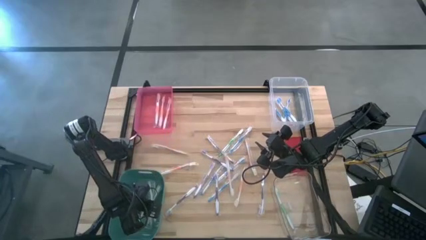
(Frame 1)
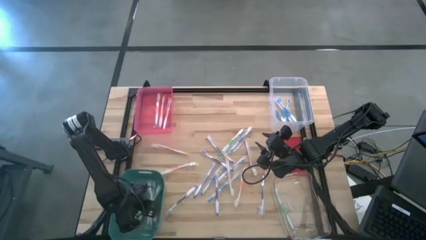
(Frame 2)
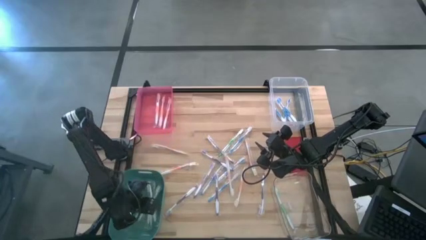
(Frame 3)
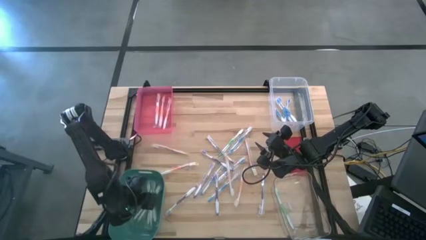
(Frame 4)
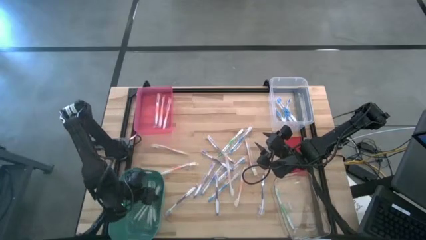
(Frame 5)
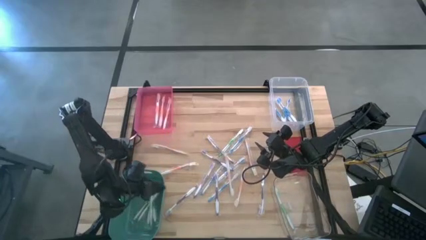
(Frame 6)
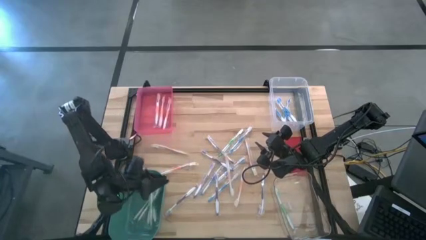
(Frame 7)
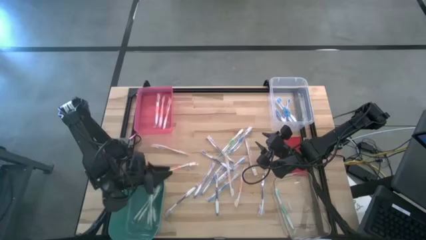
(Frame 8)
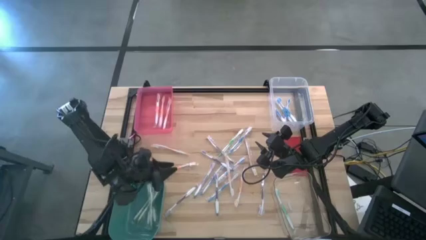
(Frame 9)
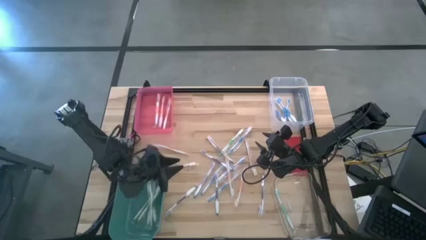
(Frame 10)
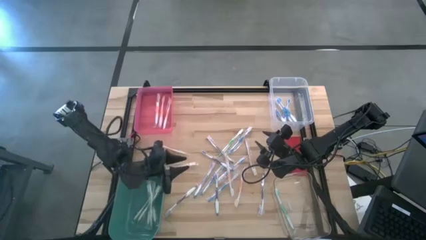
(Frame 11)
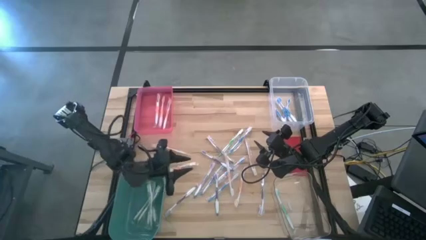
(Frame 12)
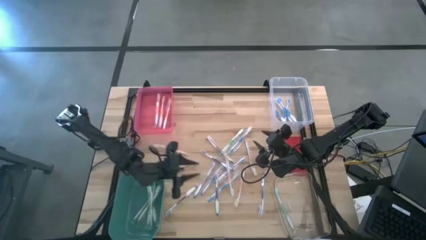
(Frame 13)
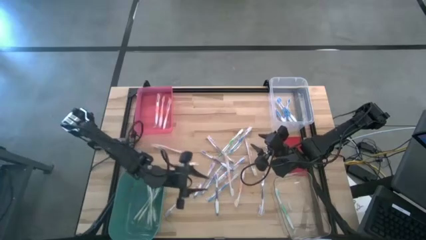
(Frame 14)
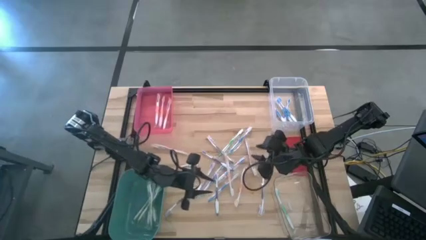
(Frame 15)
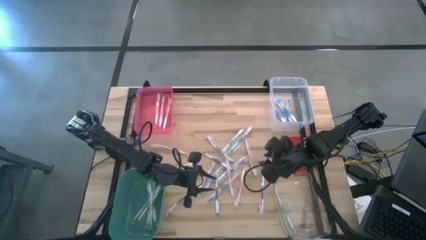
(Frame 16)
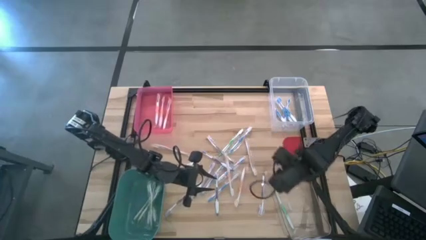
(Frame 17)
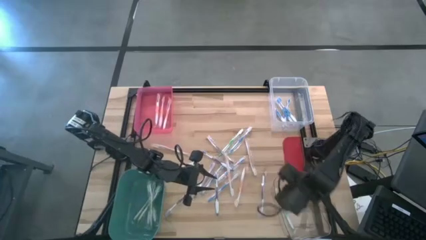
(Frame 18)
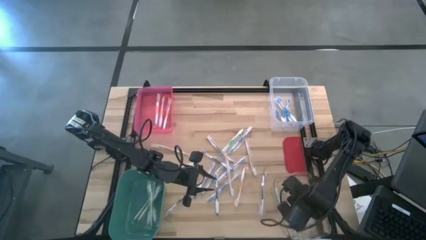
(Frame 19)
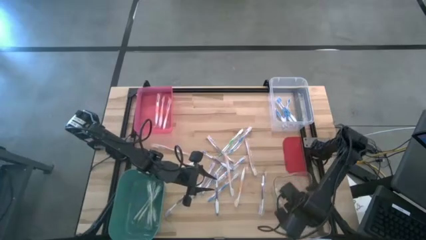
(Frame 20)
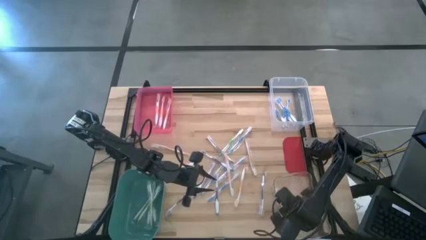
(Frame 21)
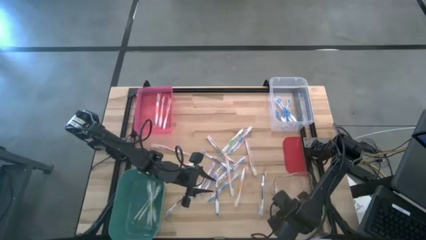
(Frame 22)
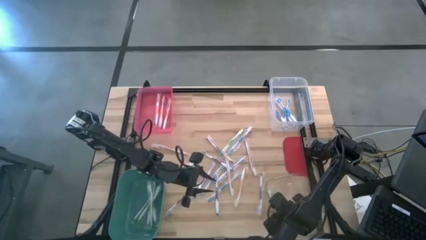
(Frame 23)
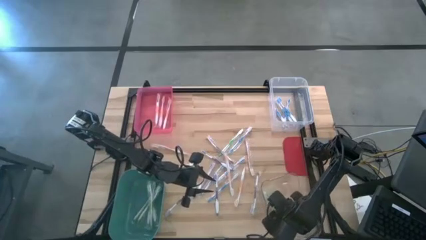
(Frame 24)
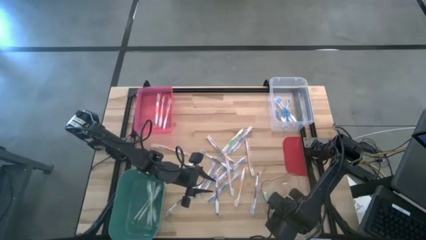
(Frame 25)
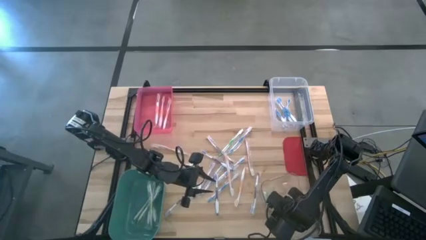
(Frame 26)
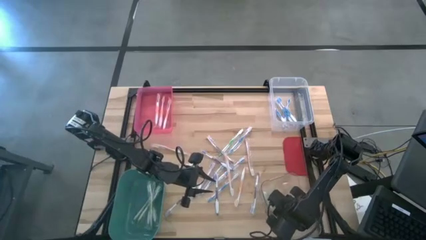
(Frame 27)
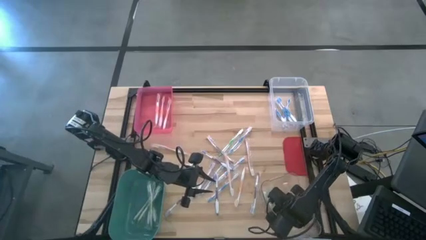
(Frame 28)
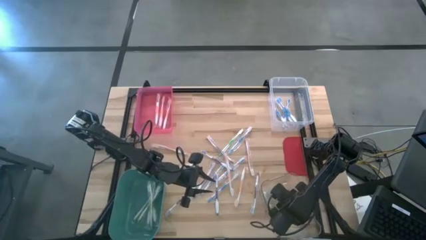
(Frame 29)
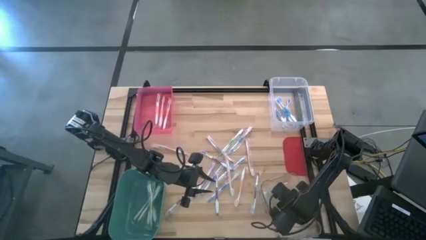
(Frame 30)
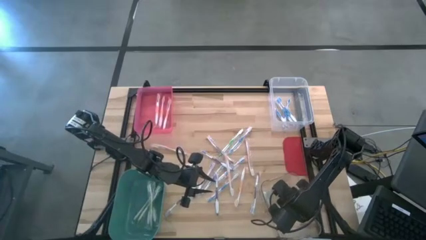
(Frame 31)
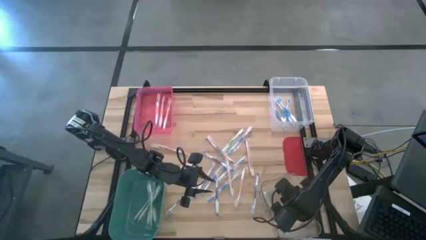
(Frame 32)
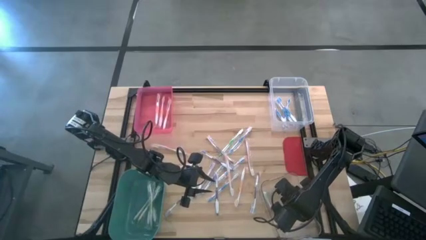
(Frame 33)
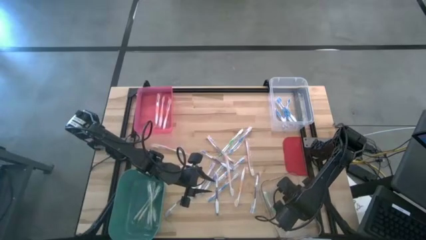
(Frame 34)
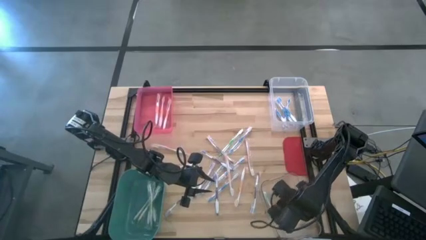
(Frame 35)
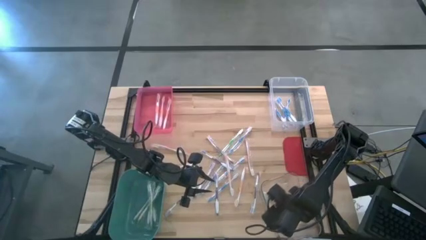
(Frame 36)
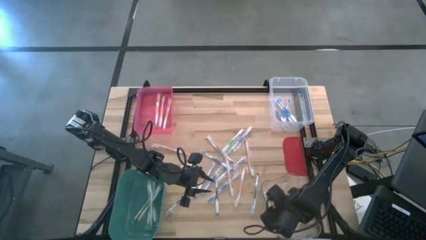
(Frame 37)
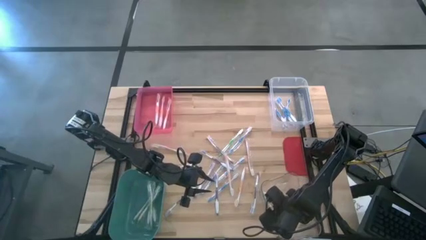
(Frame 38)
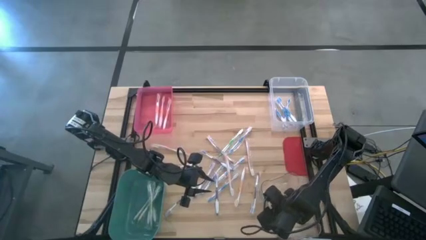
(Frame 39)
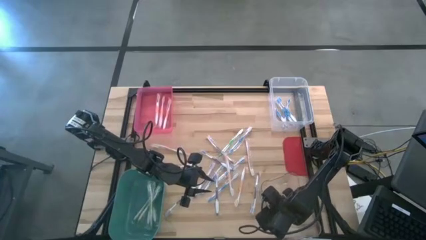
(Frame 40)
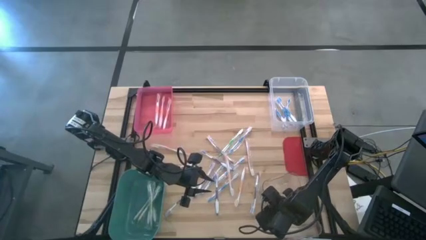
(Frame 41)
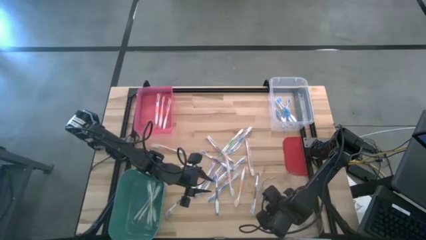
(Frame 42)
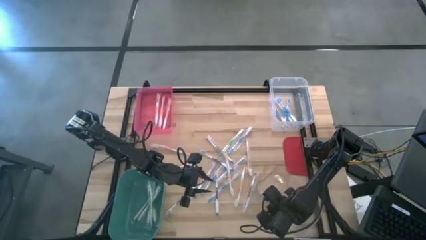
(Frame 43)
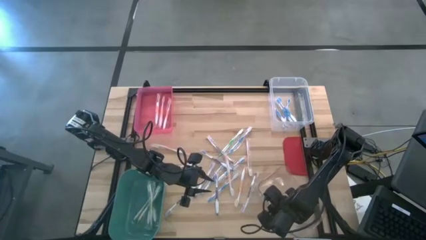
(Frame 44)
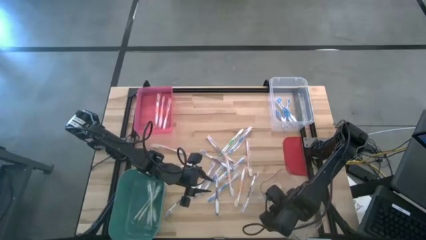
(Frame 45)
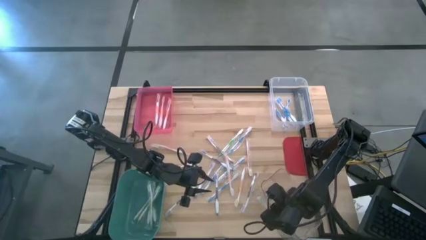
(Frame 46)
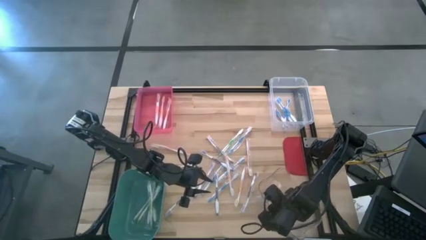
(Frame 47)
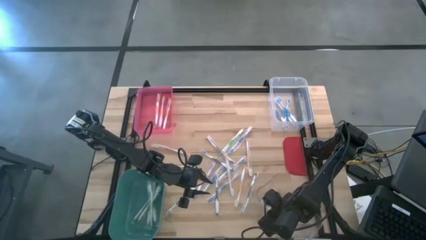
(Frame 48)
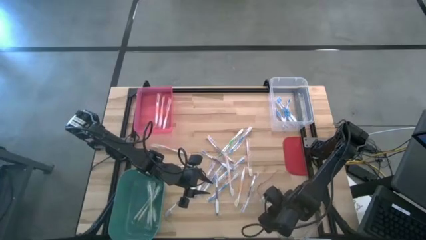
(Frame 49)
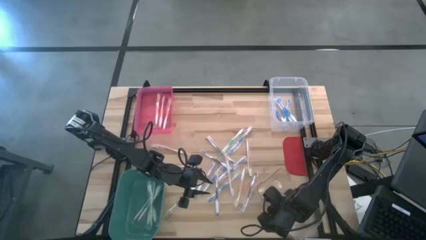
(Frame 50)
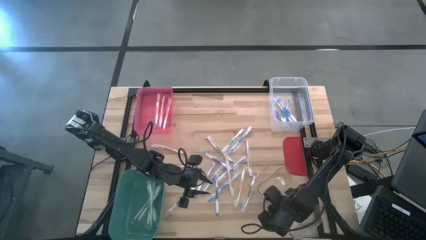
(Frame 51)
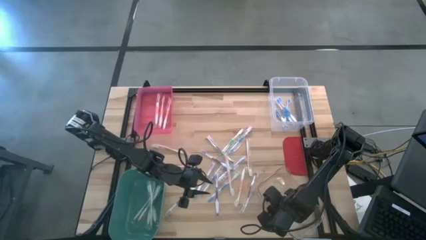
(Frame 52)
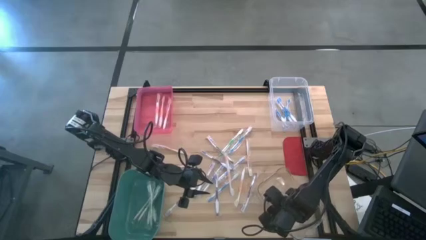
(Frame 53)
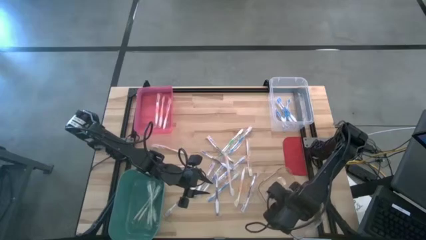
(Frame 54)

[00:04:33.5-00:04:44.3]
Task: Pick & Place Toothbrushes
Adjust the bottom transparent bin

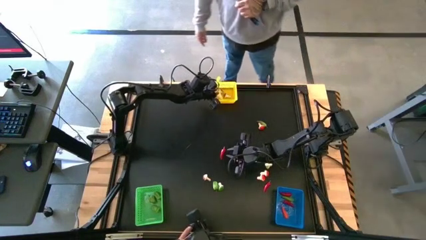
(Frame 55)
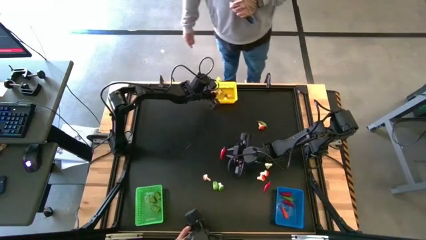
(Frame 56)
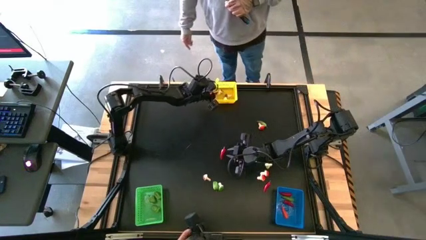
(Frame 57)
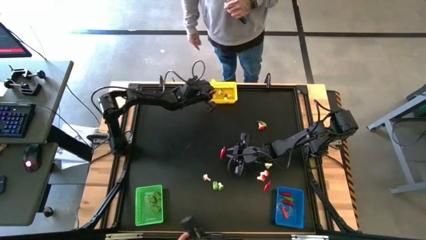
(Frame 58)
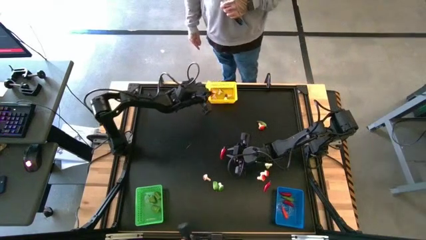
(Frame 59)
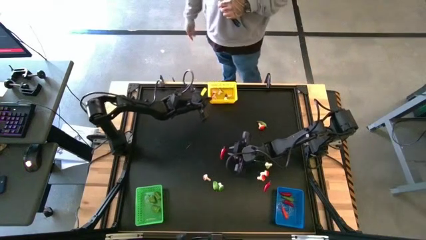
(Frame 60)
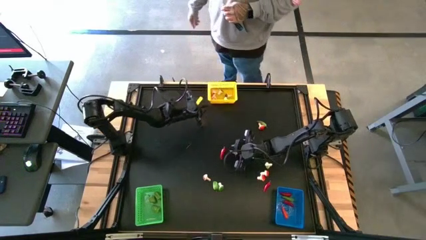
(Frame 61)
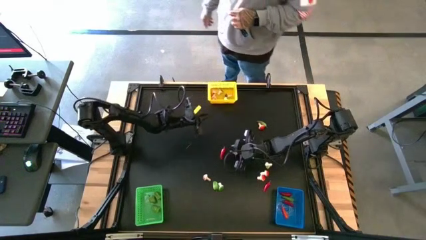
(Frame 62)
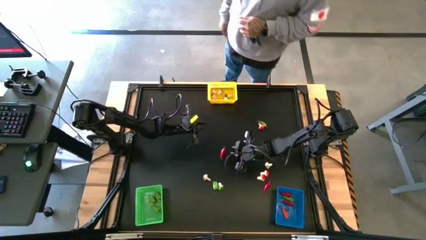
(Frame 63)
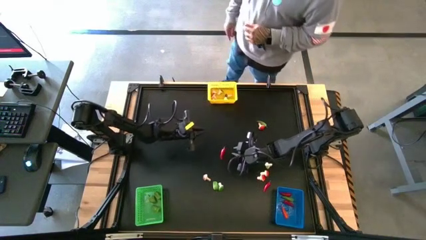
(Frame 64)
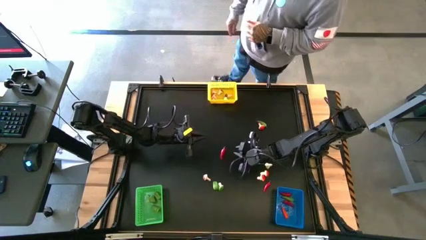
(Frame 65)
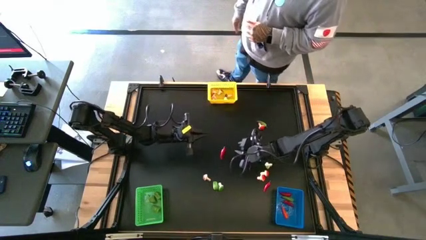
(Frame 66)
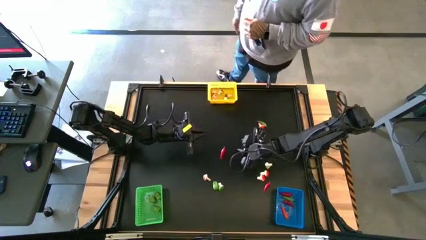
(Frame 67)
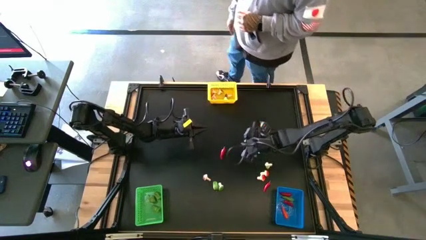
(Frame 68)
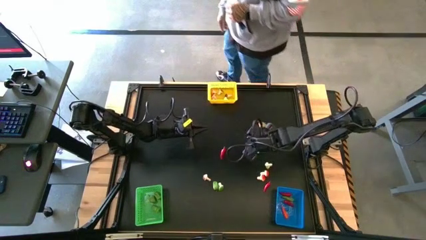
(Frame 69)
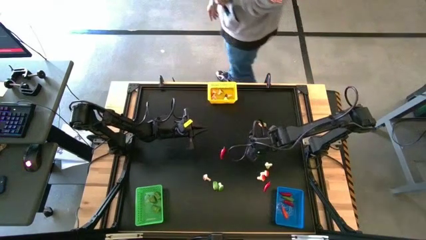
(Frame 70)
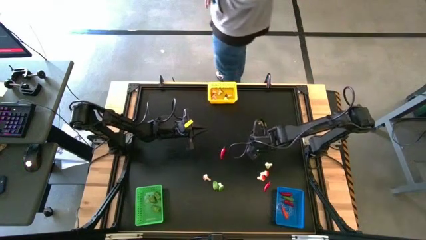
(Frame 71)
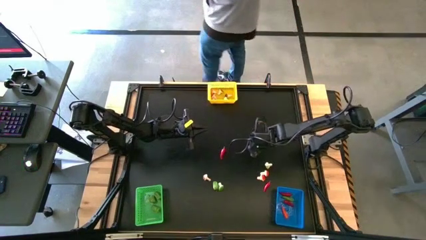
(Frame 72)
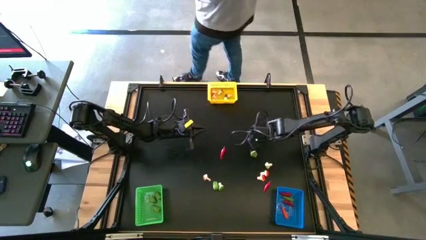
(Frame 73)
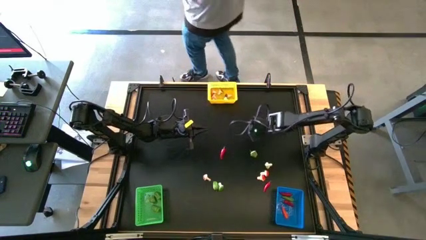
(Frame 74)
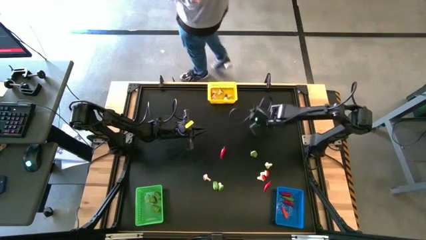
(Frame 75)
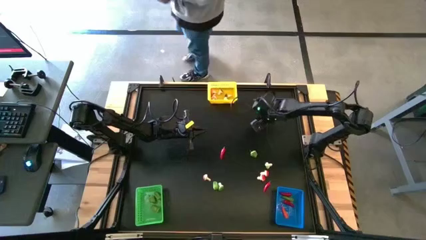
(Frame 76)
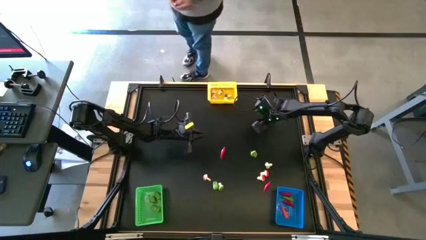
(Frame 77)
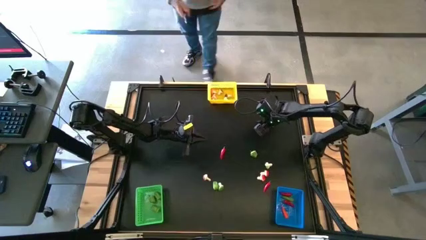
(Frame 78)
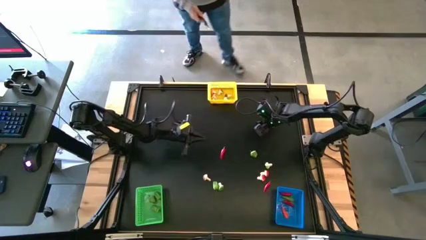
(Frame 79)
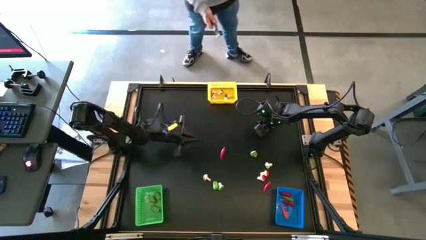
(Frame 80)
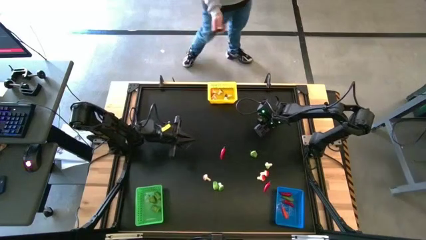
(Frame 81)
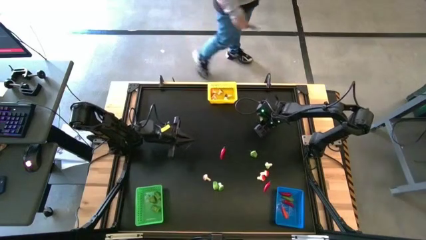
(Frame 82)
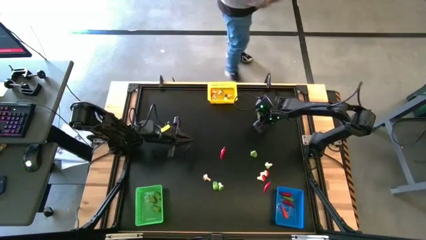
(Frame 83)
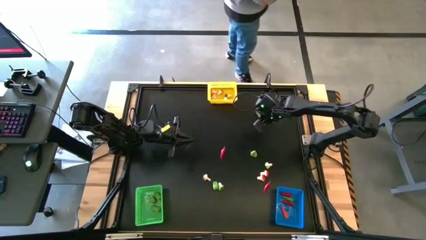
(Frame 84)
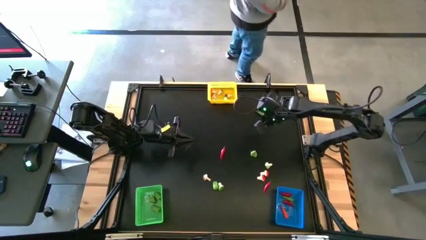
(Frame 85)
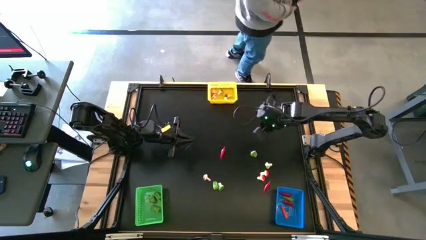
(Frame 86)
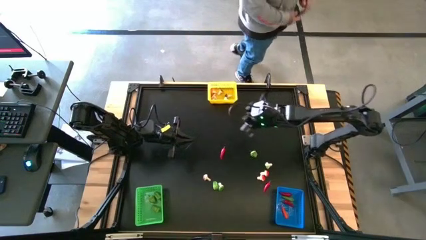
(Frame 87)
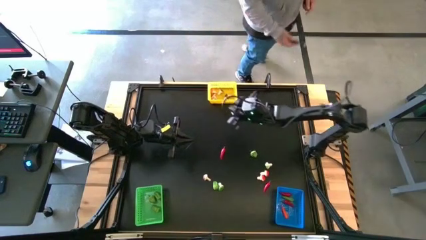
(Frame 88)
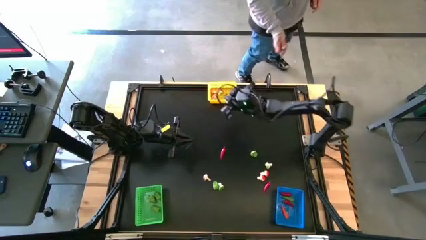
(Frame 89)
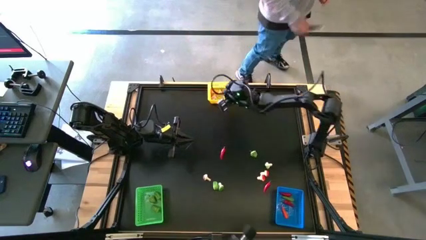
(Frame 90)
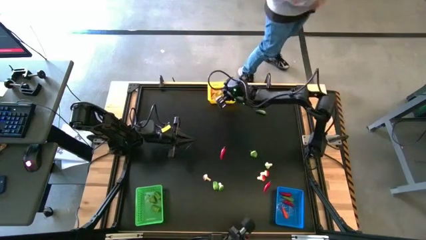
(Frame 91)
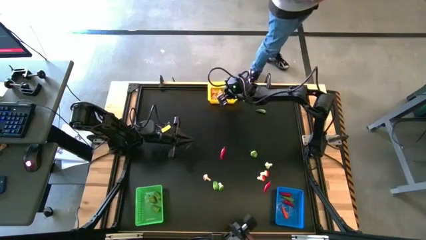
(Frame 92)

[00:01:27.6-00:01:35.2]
Task: Sort produce into baskets
Put the top right brown mushroom into the yellow bin
